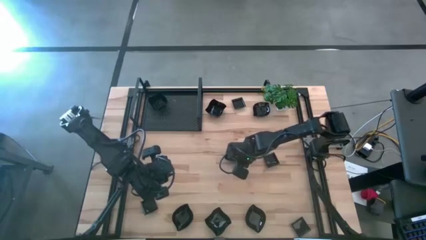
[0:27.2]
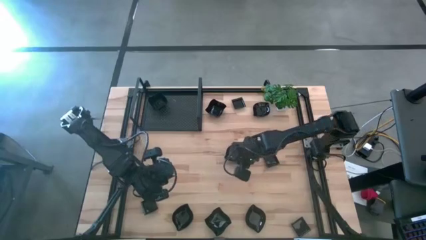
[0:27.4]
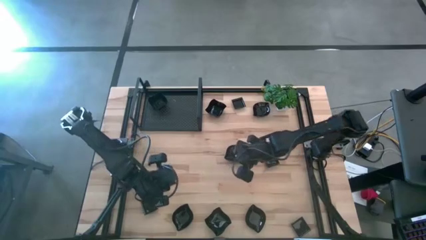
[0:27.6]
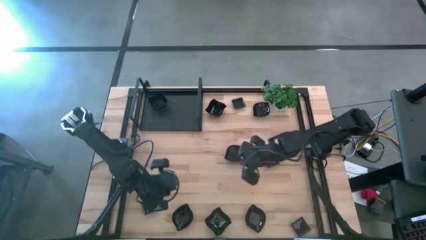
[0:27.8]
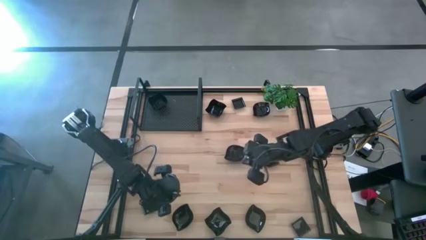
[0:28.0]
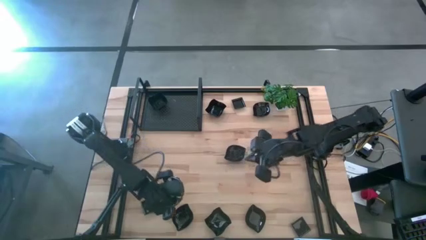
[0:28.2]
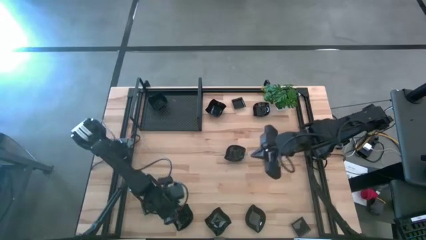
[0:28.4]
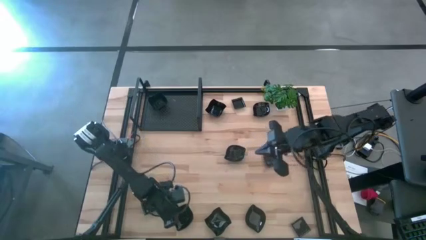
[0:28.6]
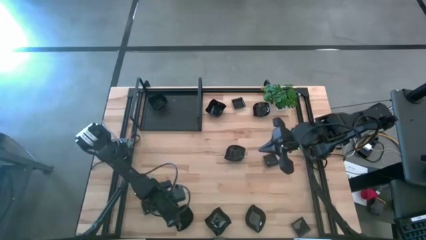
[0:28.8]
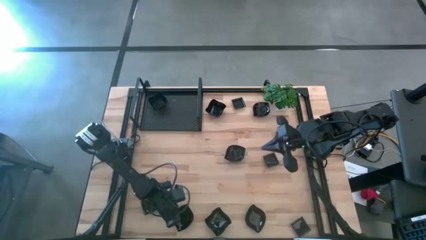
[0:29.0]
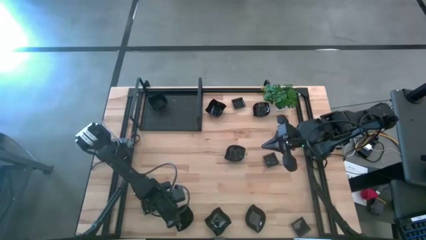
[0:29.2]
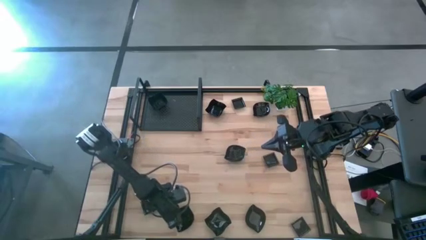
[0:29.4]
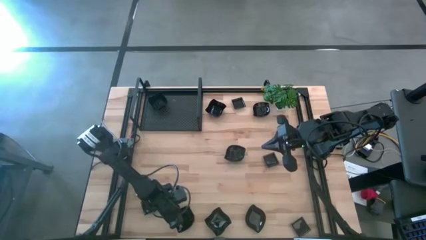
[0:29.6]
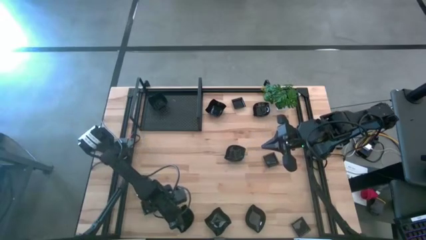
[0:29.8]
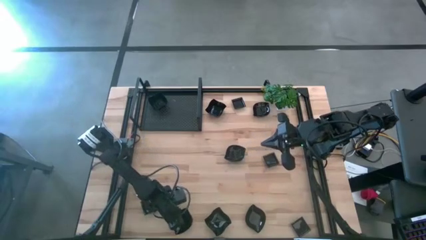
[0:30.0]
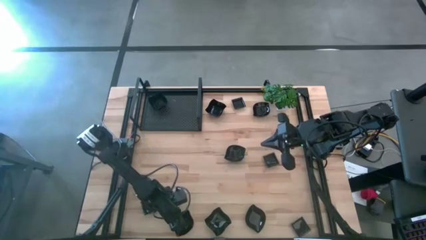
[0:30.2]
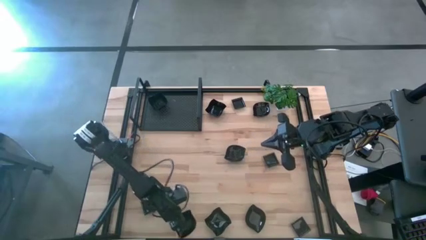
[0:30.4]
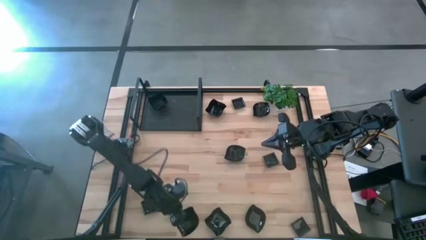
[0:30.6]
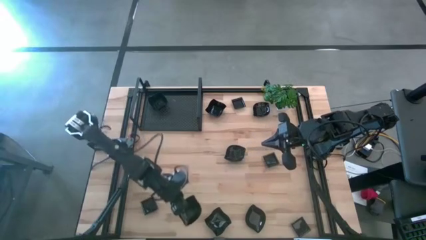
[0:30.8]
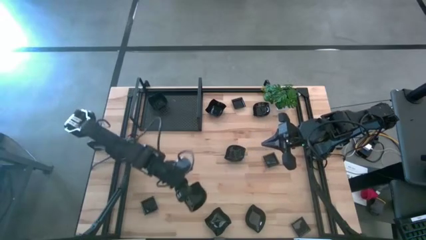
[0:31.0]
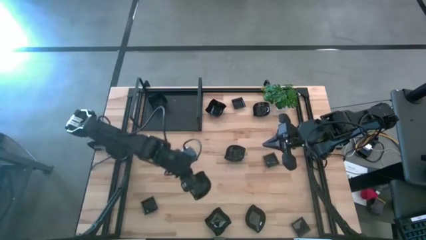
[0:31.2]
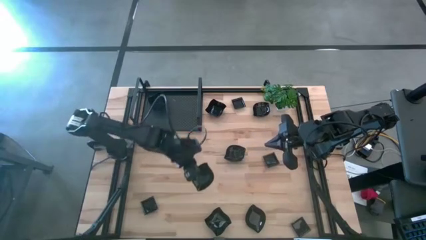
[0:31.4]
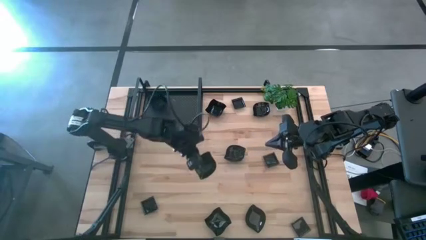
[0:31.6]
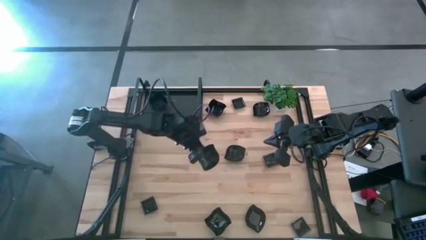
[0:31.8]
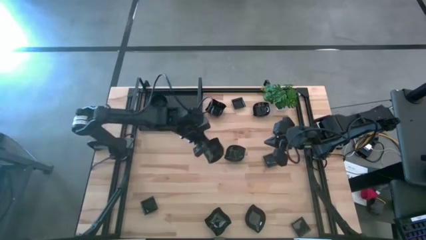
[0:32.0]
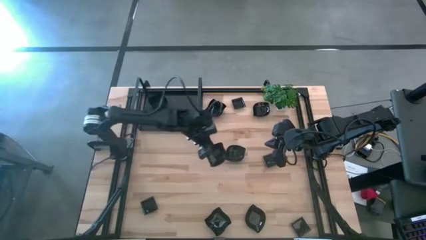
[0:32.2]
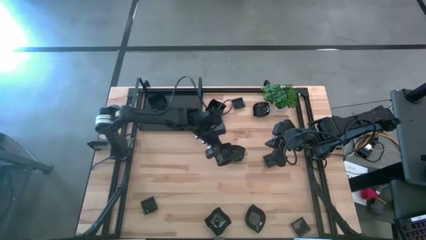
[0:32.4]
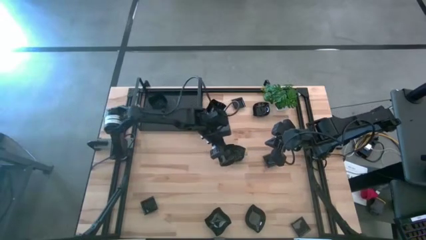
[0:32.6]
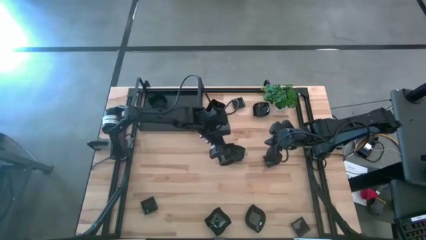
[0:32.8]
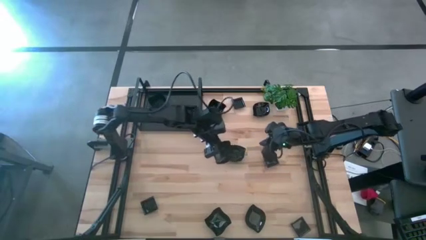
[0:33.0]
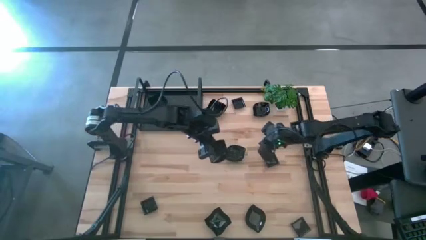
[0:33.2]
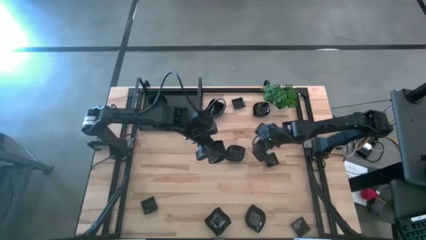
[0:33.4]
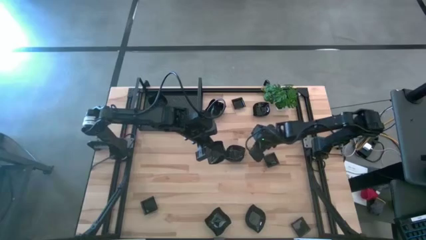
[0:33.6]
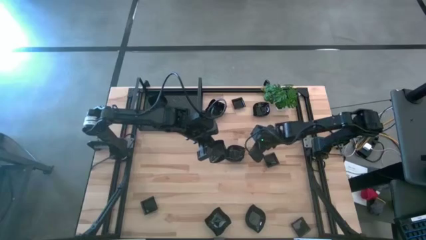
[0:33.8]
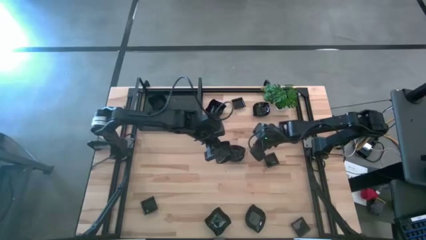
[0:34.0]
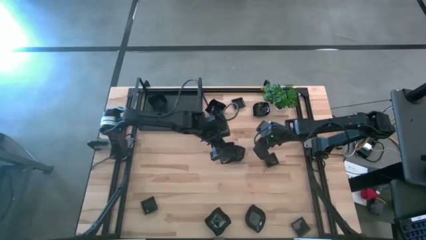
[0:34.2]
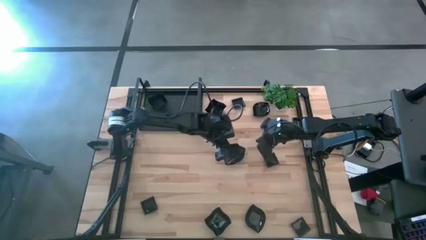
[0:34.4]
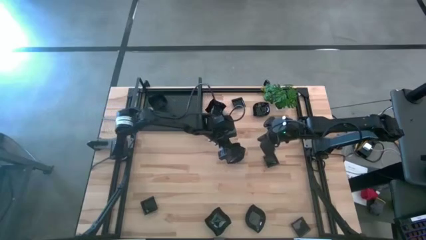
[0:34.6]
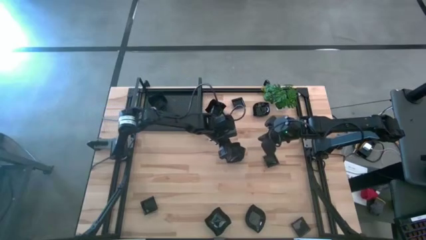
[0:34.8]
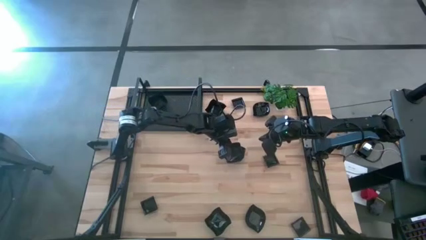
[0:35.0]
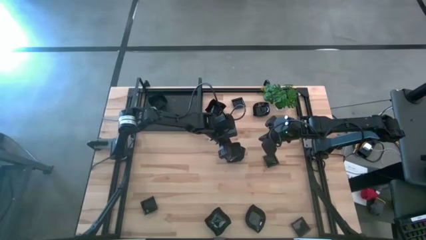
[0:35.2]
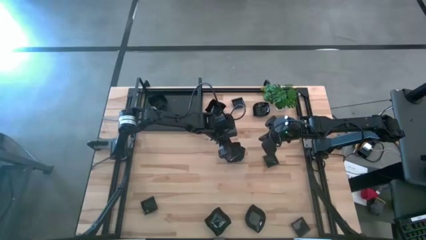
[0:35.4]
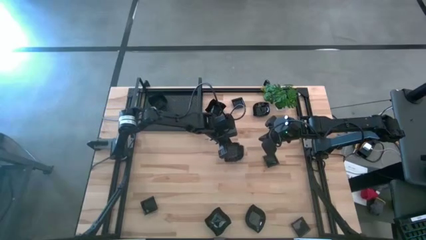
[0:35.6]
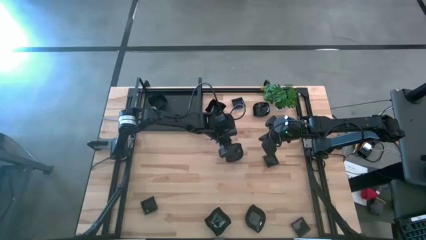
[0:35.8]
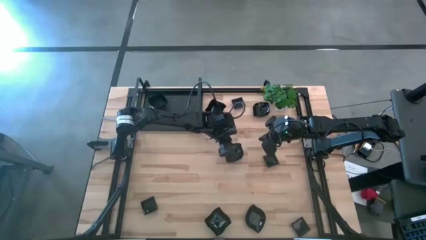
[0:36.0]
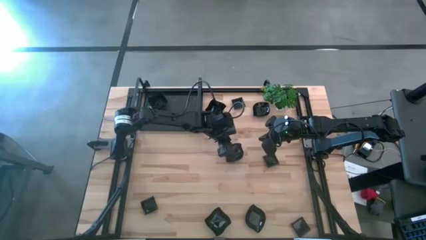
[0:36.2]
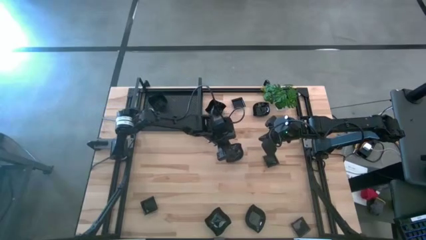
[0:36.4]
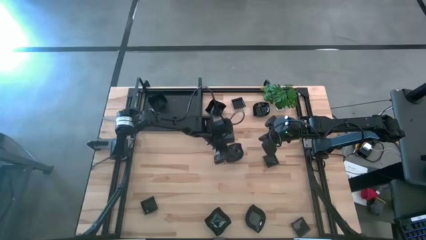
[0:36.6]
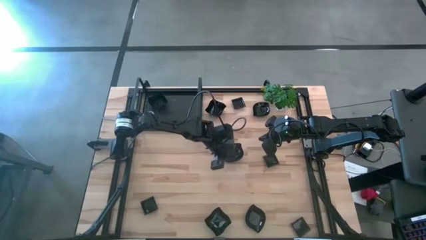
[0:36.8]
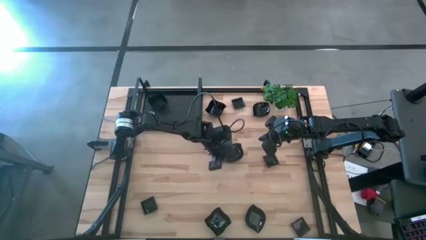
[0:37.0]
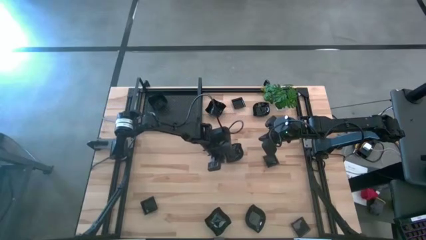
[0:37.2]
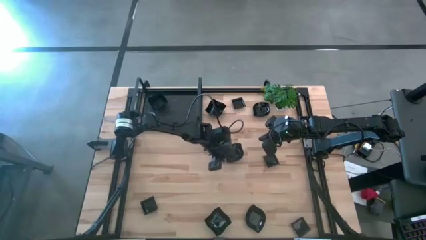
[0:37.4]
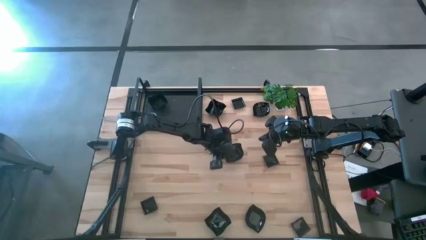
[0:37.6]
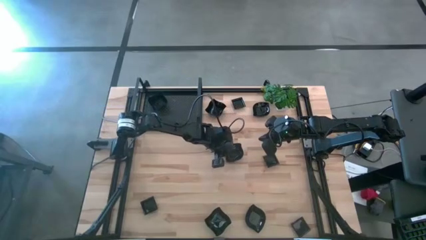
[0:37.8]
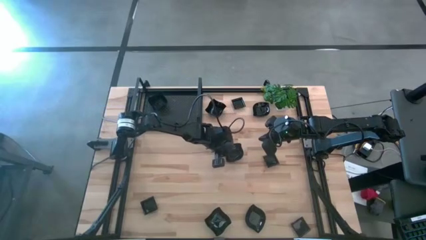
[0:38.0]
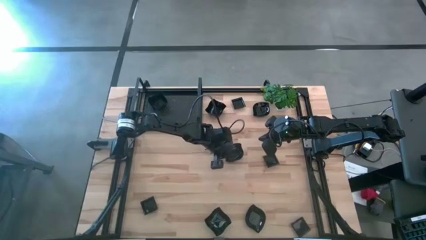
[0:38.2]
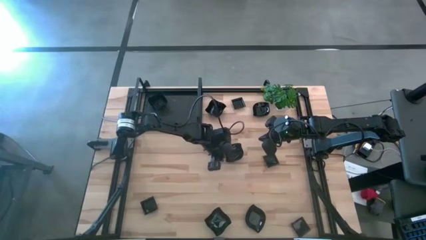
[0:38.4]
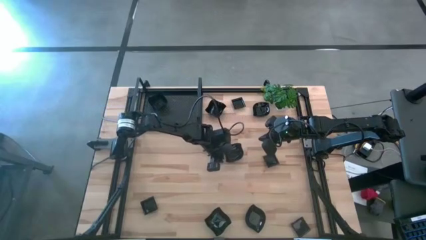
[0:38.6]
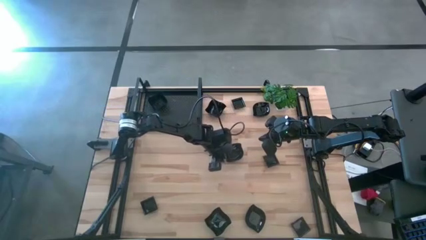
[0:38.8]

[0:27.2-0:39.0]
Task: Pick & Place Mini shaped plates
Stack the black leaf shaped plate on top of the black leaf shaped plate on the table

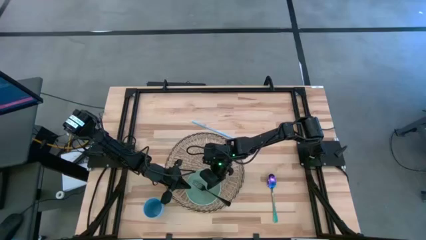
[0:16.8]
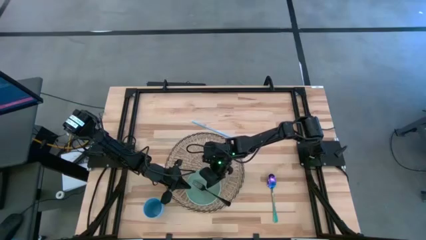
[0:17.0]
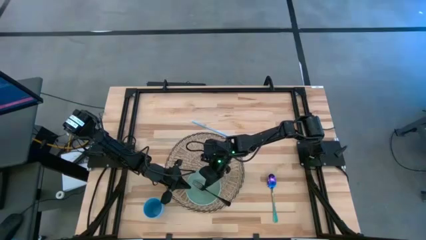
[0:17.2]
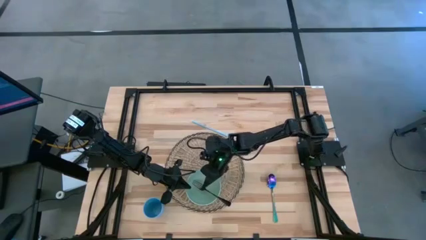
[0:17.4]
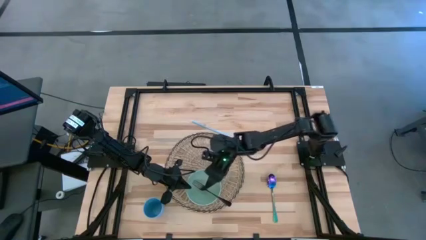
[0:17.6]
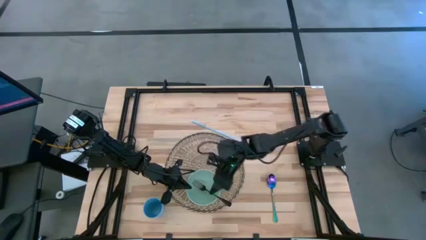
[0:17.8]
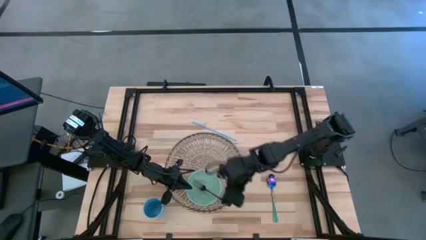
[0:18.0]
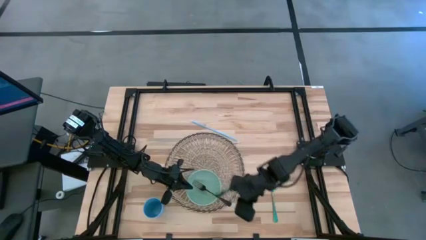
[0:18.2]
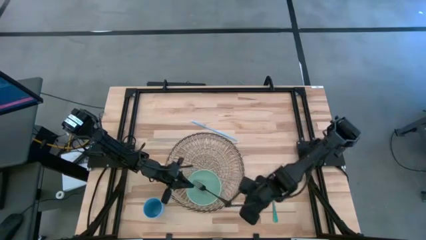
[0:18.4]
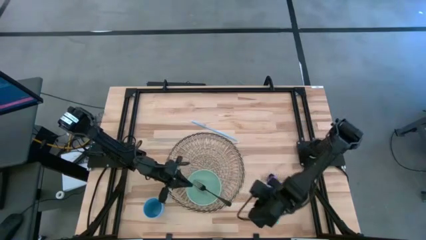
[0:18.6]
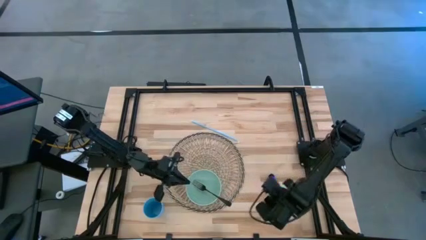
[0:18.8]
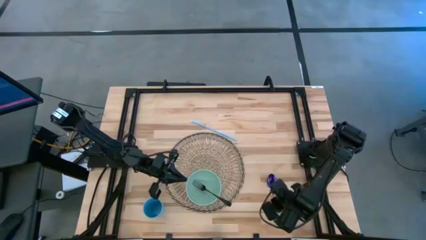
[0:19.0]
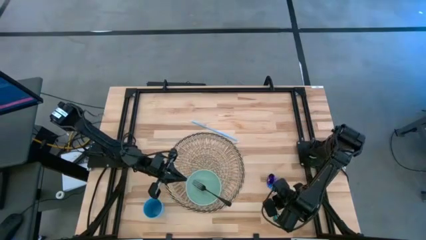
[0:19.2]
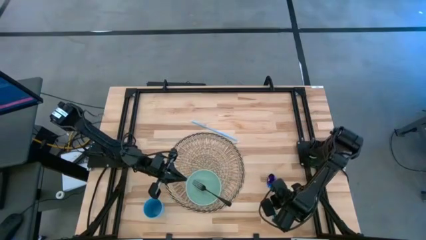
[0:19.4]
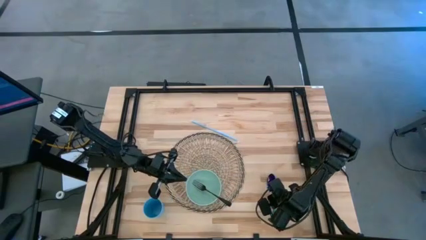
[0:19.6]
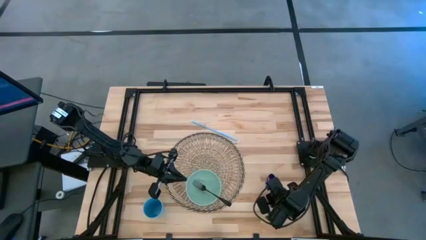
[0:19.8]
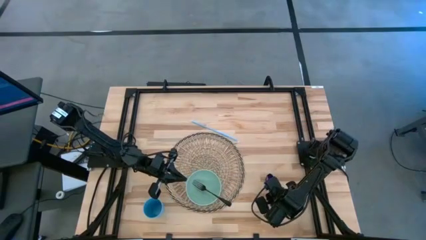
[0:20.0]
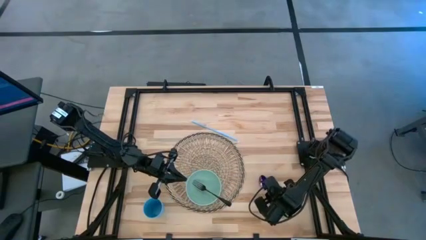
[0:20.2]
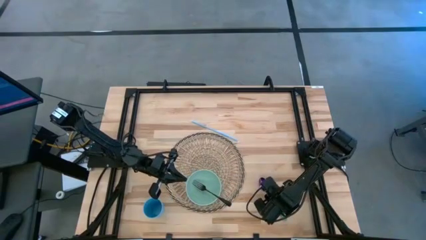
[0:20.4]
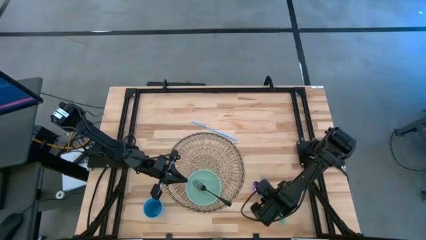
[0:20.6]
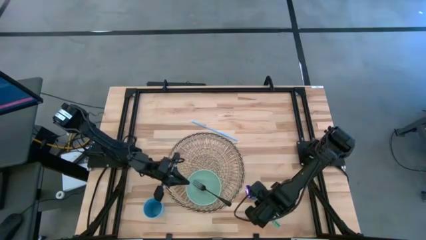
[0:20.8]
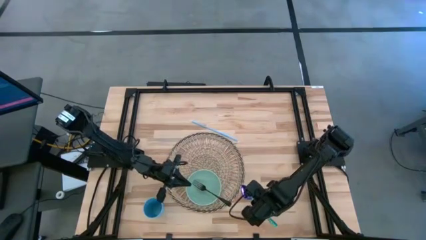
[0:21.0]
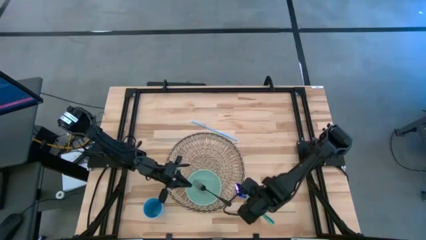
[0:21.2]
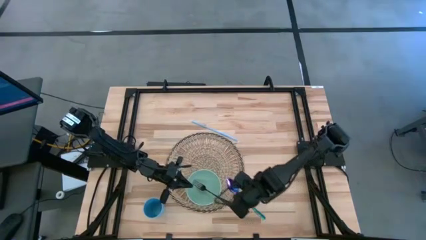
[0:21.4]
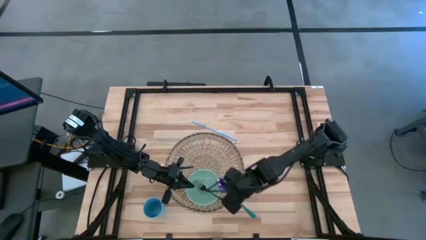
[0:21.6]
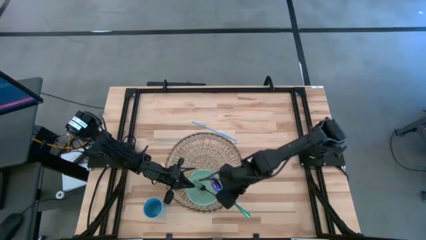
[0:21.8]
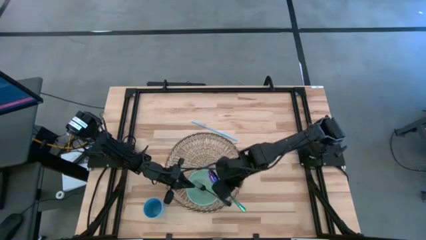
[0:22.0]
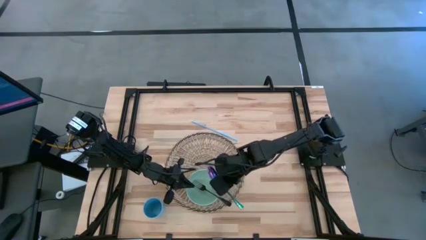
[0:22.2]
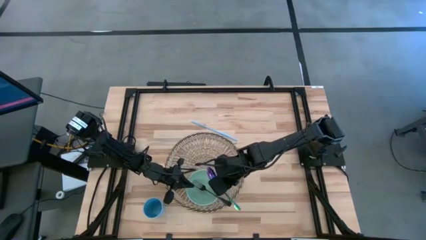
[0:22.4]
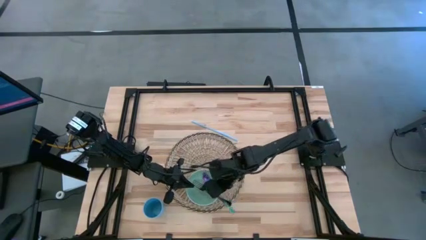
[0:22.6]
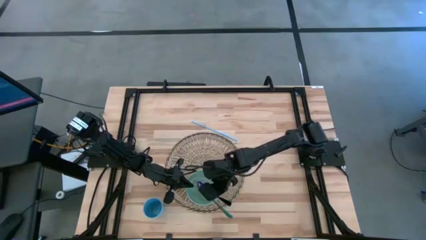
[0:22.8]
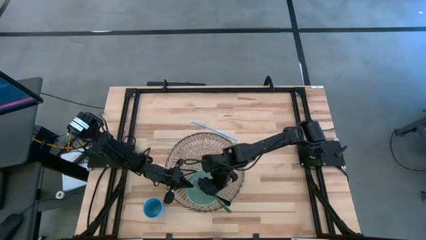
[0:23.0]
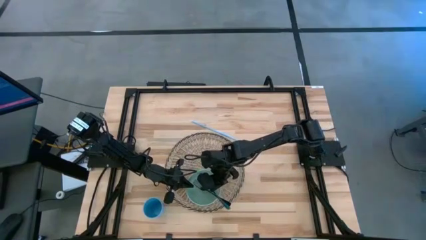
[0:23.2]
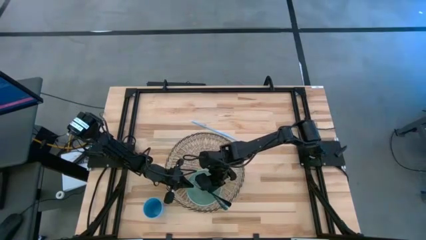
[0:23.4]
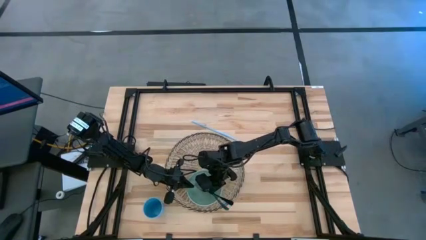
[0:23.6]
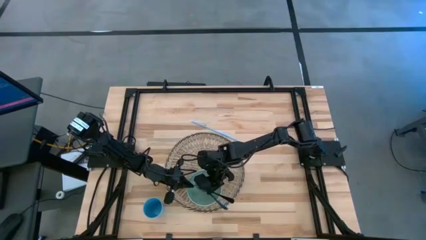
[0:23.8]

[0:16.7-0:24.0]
Task: Pick & Place Utensil
Put the blue spoon into the blue bowl on the brown mat
